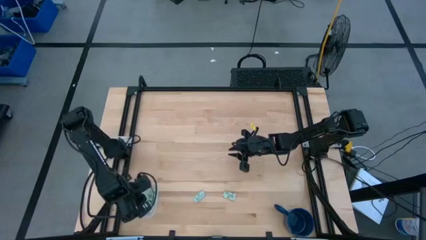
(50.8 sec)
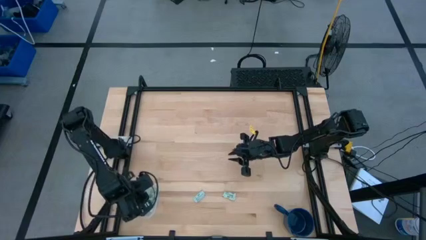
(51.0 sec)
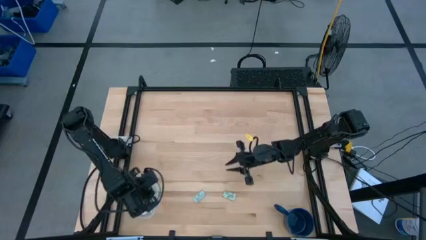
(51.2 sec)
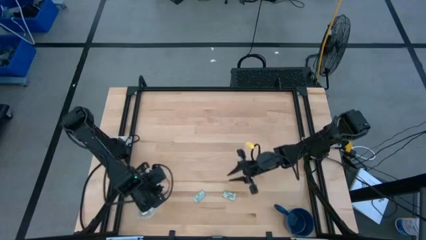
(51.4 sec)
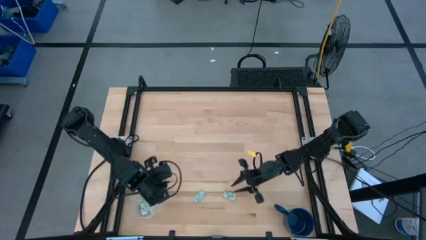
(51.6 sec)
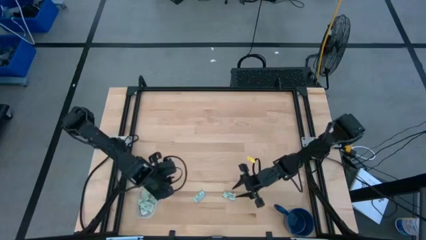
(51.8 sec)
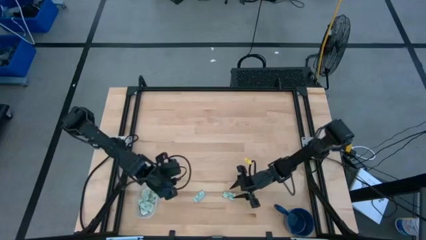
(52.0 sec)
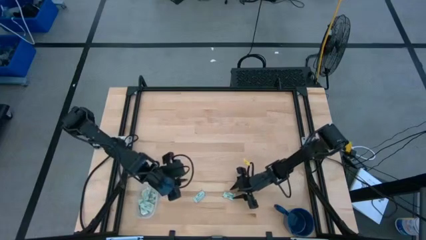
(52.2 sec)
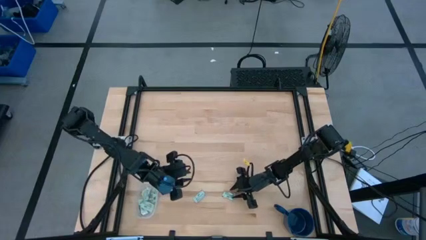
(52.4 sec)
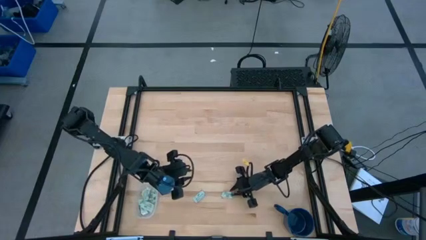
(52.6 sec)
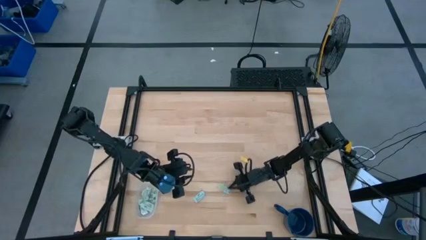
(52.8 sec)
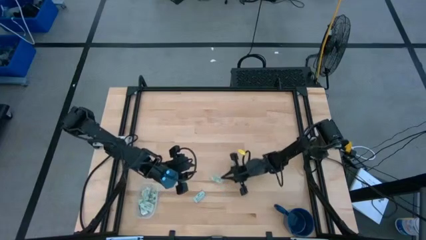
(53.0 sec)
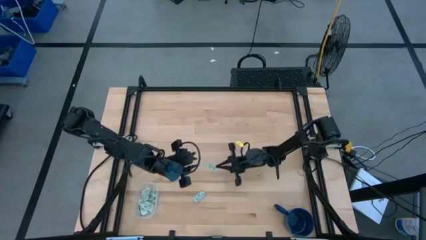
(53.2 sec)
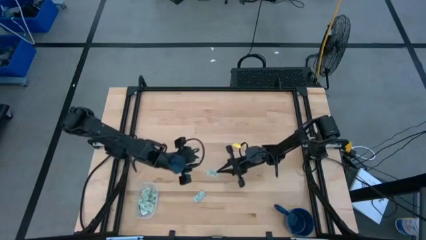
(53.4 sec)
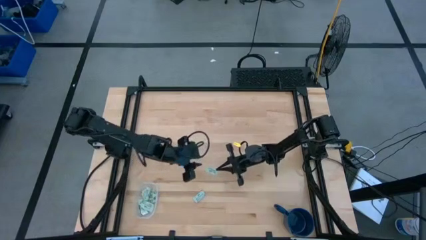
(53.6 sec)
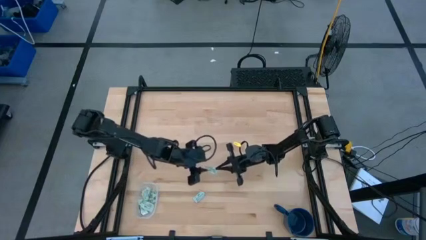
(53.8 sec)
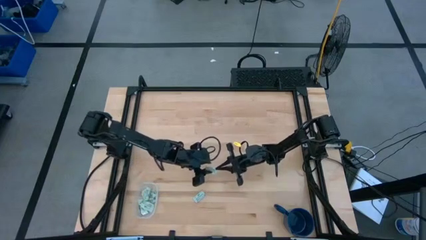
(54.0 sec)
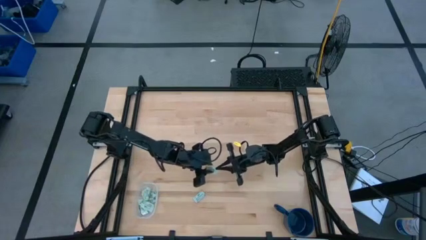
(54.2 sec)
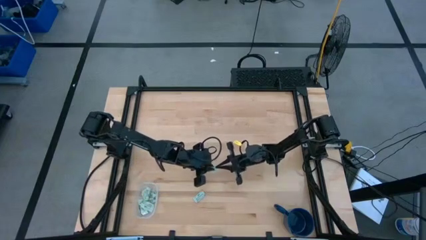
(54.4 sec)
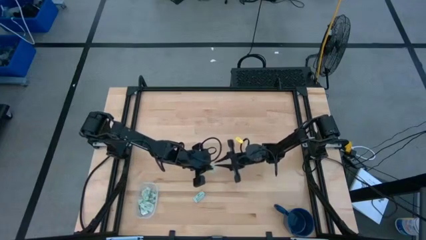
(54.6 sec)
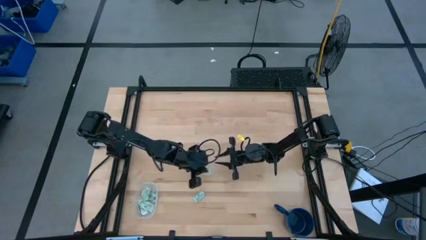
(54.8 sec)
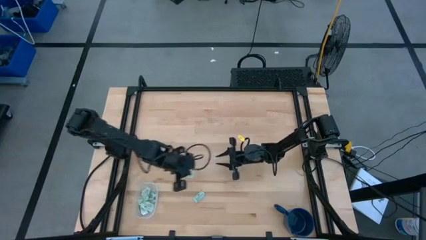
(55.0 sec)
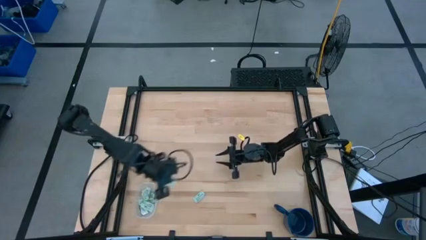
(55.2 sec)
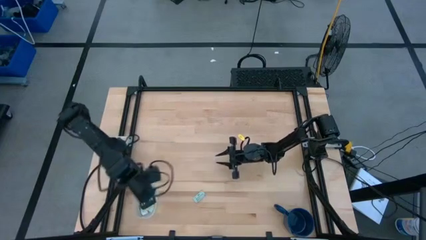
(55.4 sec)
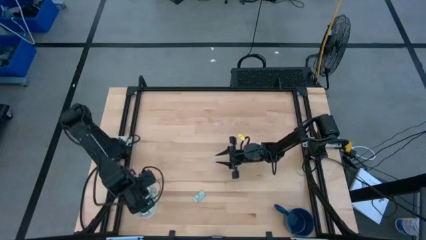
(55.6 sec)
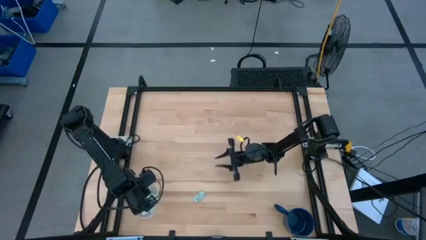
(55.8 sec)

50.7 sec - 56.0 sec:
Task: Pick and place Stevia / Truvia into bins
Put the stevia packet into the transparent bin

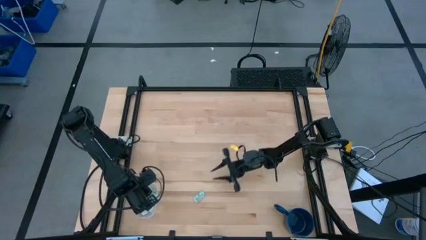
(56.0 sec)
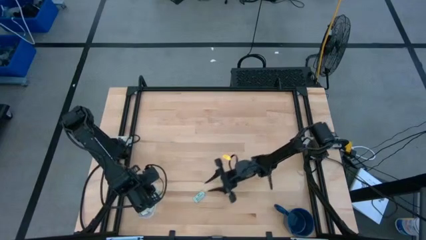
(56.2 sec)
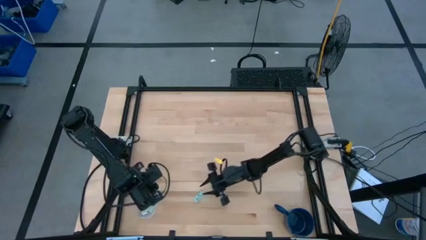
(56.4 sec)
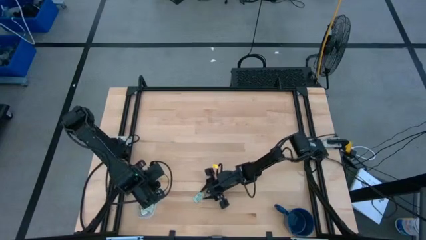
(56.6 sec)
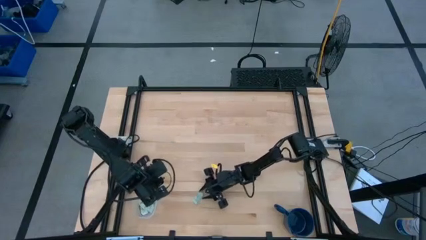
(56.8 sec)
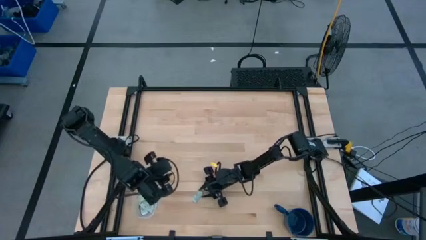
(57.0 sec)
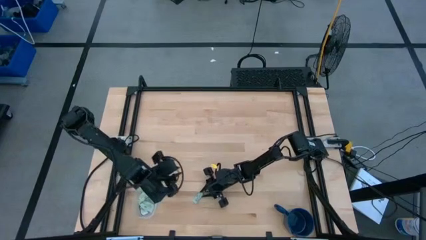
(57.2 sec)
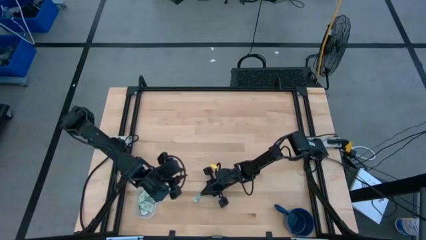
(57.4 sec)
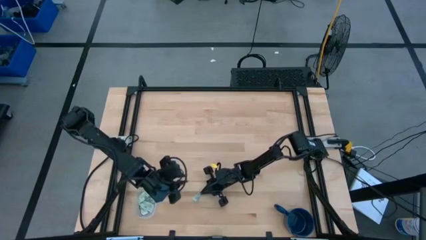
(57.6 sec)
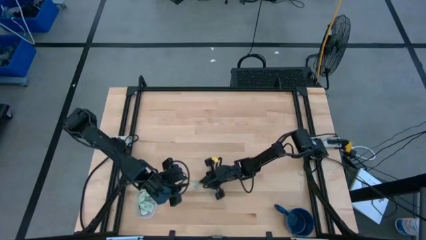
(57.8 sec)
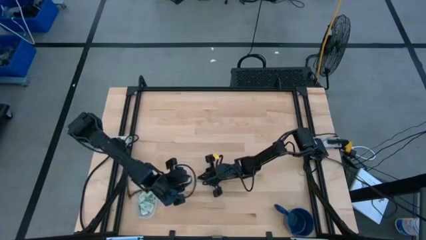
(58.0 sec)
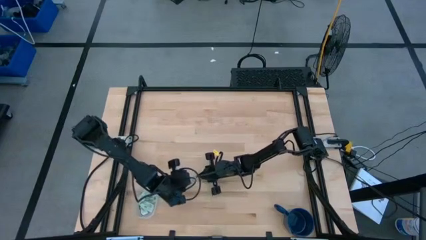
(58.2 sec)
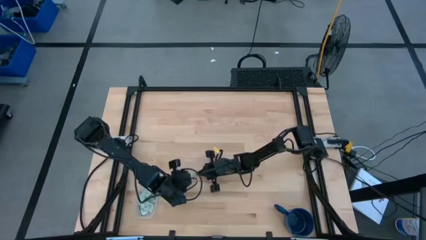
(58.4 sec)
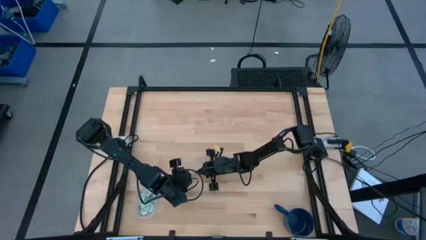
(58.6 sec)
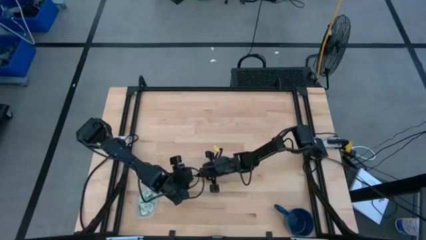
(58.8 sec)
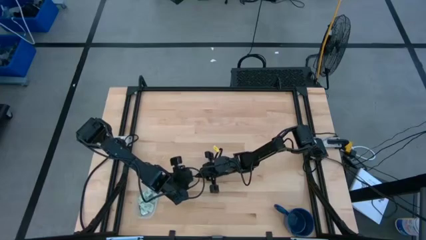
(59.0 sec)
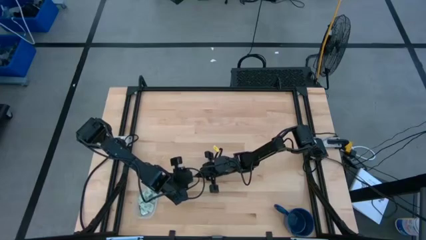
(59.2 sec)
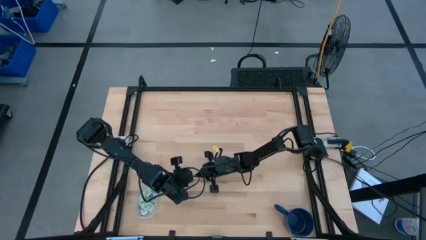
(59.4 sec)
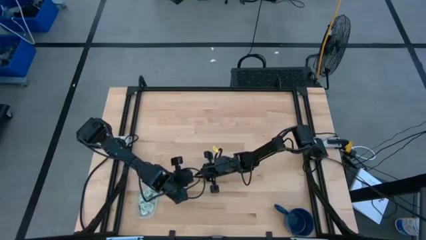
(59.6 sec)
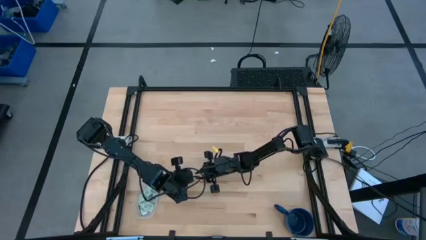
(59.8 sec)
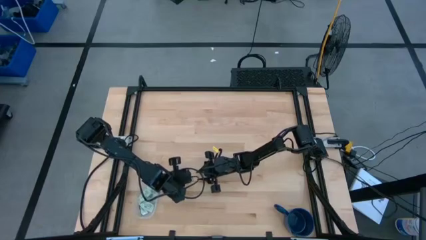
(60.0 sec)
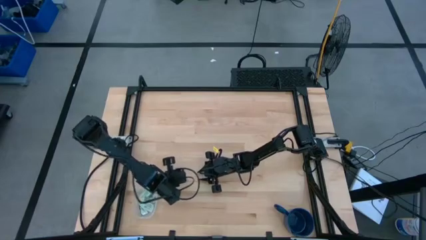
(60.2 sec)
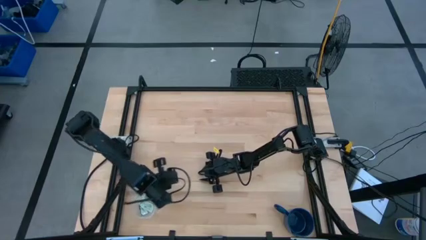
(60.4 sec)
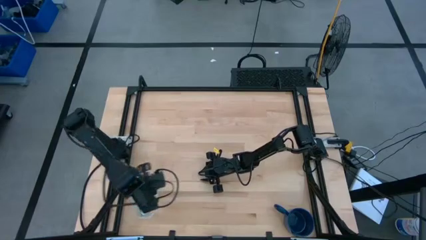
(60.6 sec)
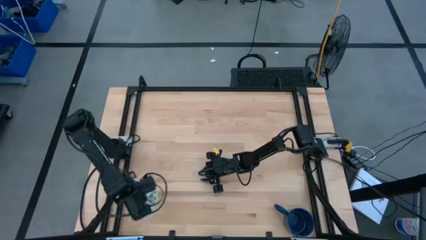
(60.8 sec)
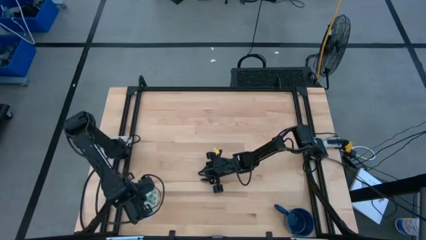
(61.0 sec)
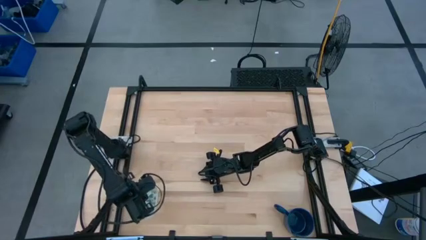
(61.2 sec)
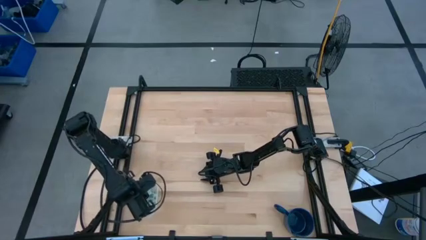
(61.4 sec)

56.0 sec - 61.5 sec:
Put the stevia packet into the transparent bin

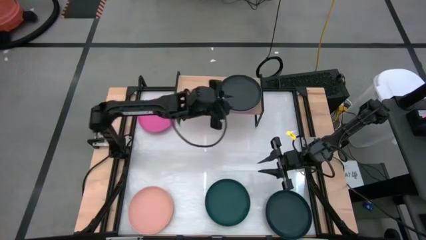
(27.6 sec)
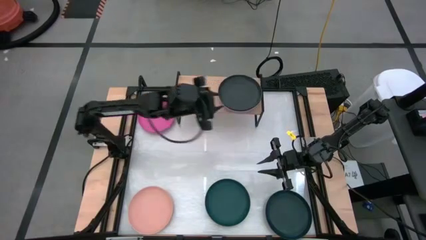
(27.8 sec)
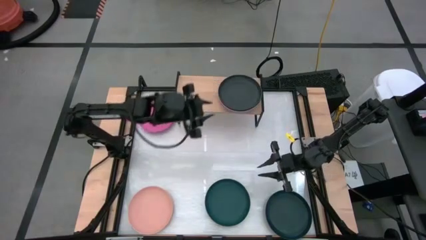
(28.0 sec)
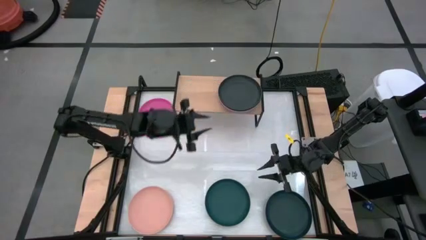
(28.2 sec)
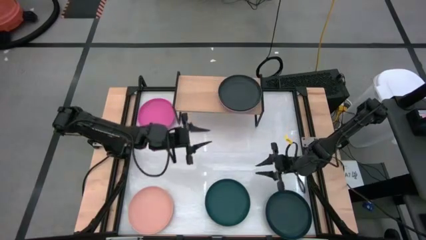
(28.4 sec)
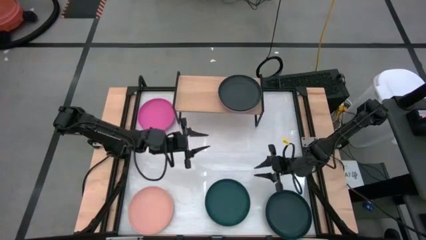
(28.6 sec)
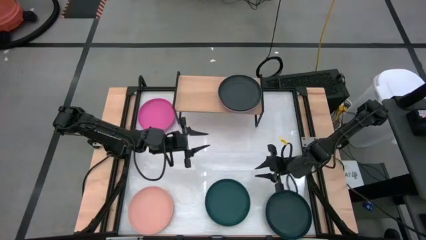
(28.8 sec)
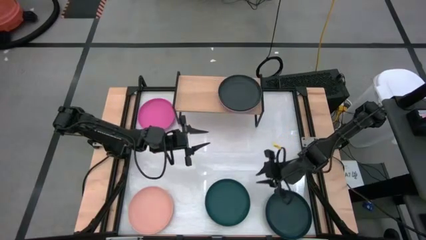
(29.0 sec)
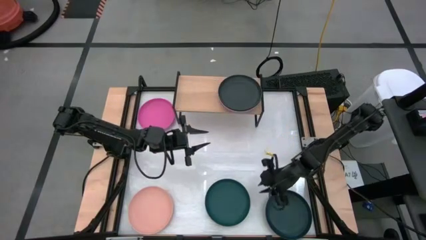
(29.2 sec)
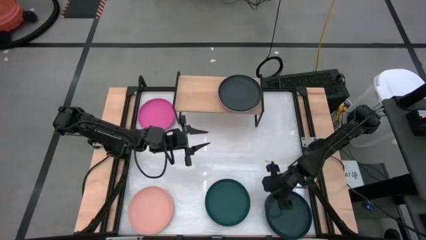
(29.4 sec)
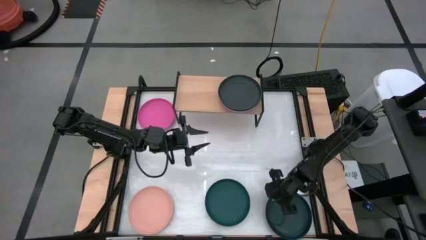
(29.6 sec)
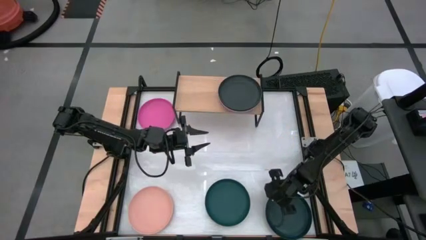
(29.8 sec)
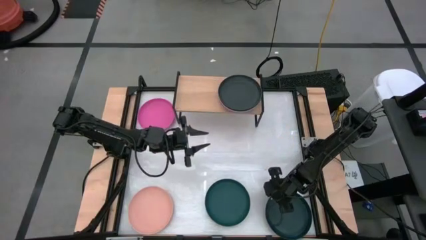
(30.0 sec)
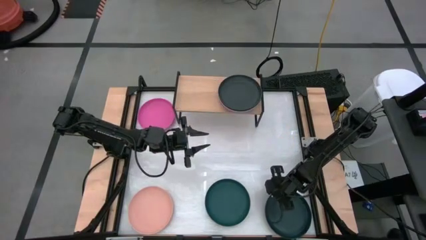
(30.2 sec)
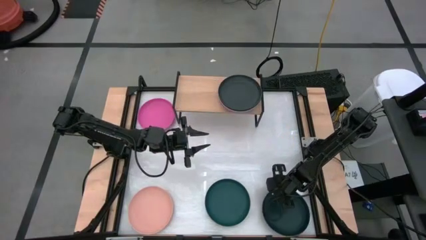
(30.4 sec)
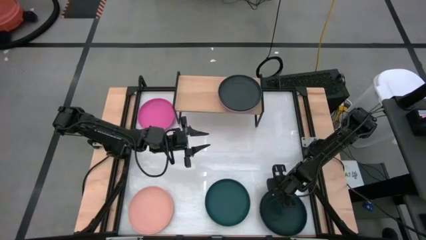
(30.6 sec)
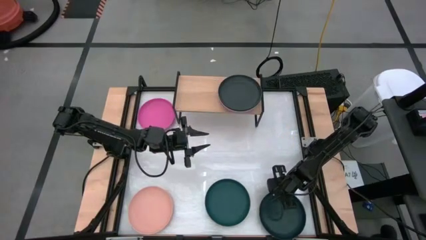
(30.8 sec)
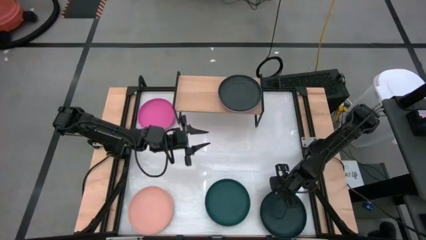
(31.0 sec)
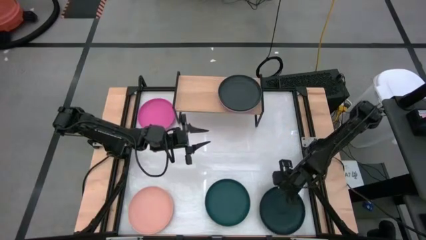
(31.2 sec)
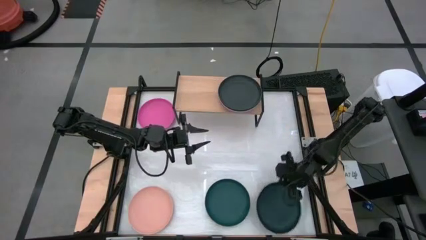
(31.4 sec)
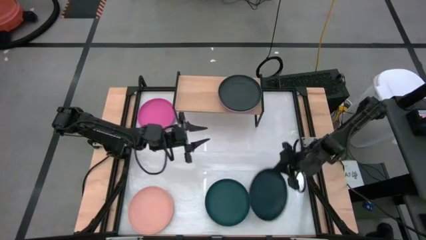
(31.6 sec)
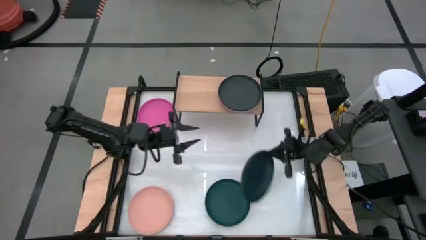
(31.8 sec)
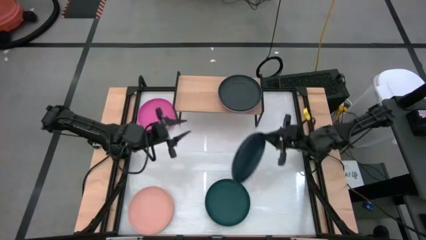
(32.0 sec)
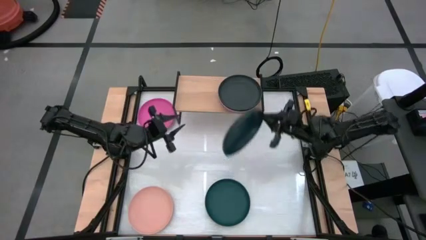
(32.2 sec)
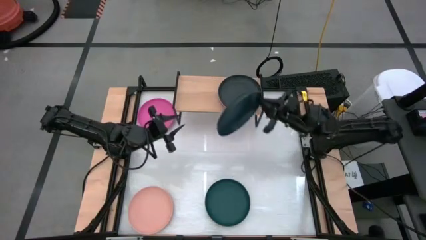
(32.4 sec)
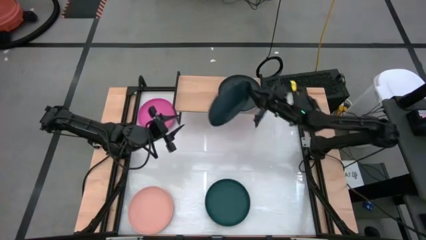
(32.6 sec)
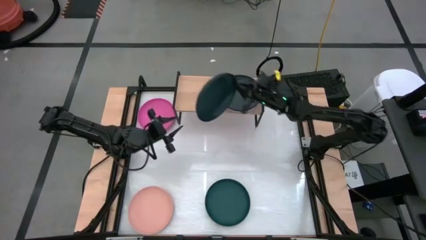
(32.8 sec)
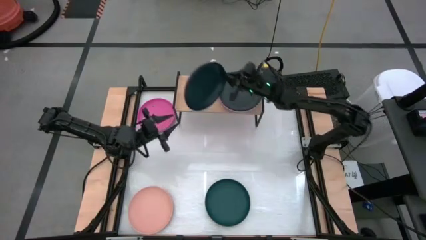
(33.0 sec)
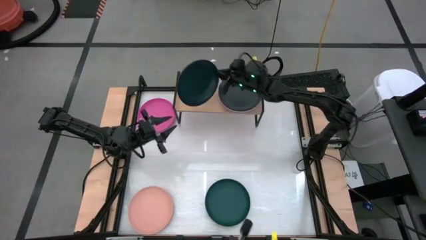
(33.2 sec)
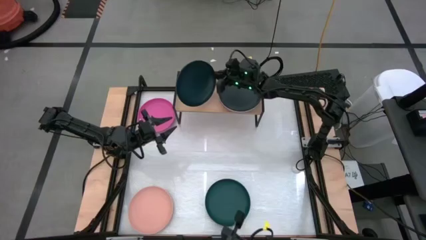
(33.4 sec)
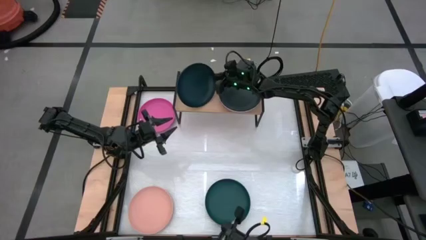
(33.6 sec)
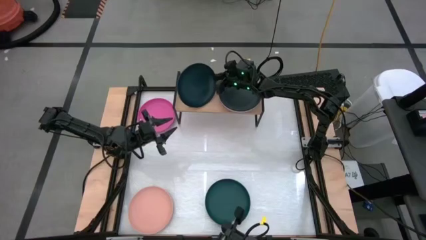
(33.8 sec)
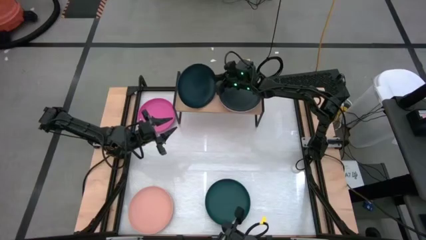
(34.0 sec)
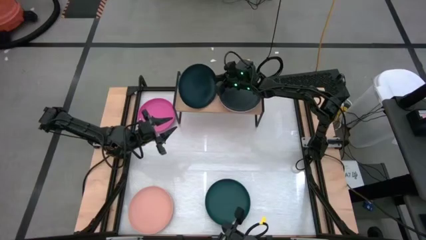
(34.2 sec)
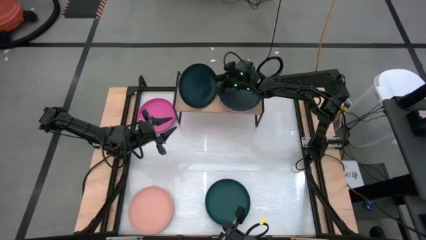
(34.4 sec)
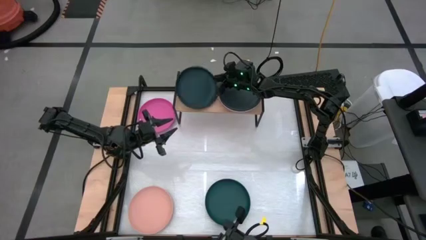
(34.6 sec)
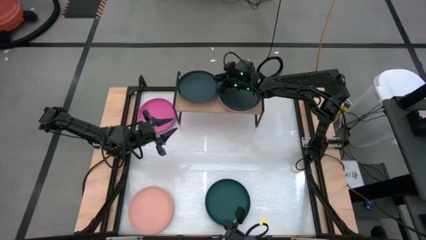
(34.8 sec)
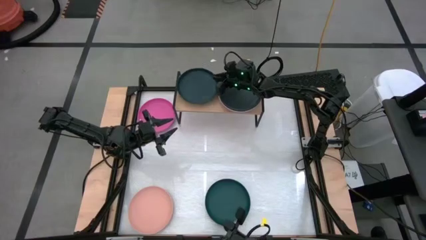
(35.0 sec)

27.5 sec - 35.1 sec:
Task: Place and stack plates onto a shelf
Put the right dark green plate on the shelf
